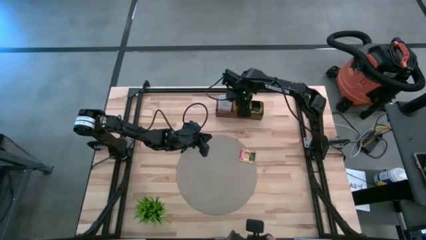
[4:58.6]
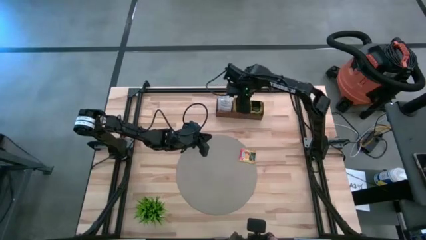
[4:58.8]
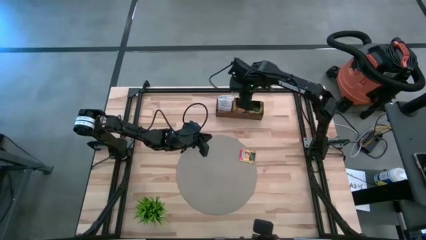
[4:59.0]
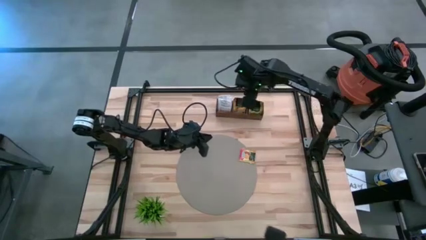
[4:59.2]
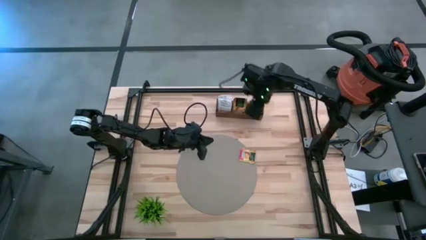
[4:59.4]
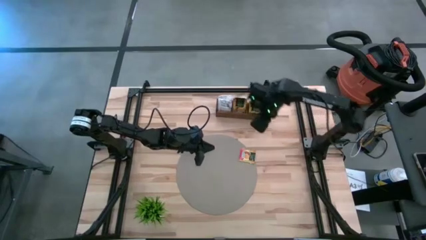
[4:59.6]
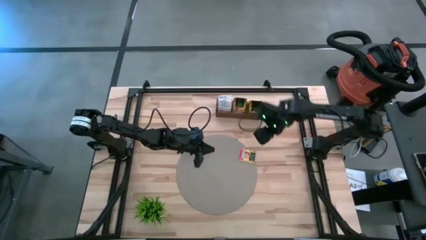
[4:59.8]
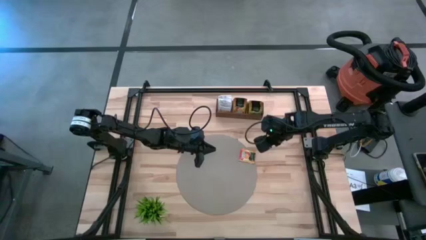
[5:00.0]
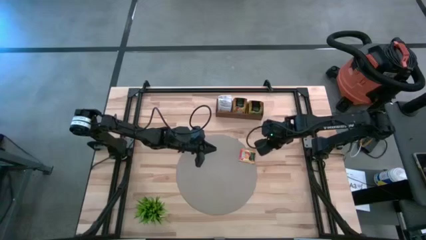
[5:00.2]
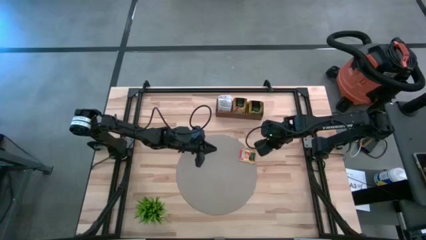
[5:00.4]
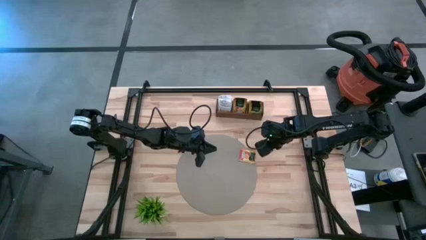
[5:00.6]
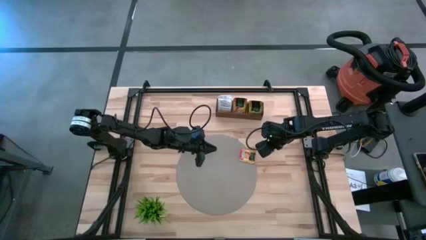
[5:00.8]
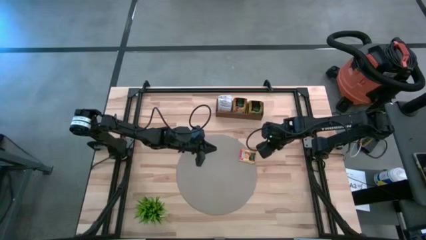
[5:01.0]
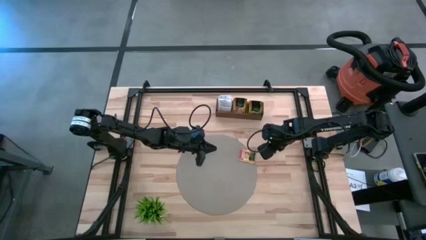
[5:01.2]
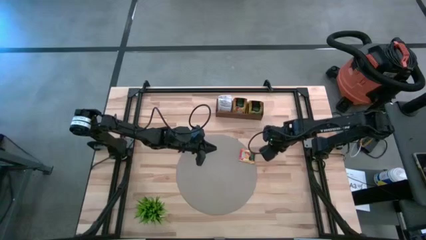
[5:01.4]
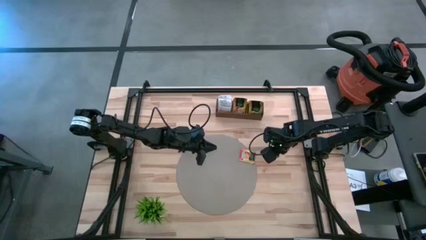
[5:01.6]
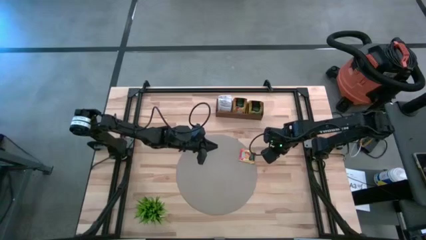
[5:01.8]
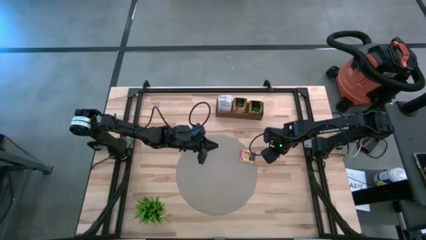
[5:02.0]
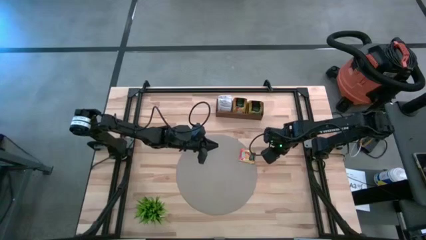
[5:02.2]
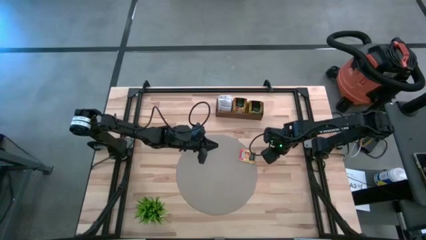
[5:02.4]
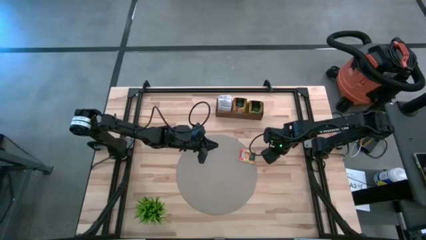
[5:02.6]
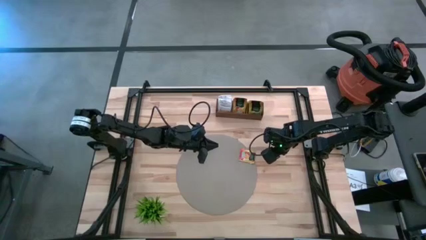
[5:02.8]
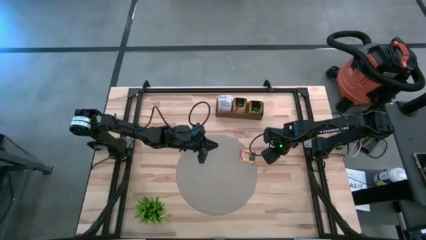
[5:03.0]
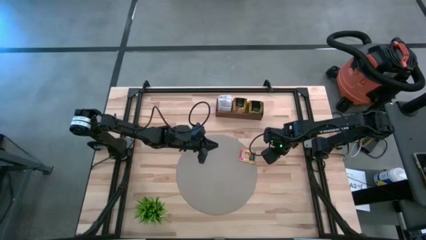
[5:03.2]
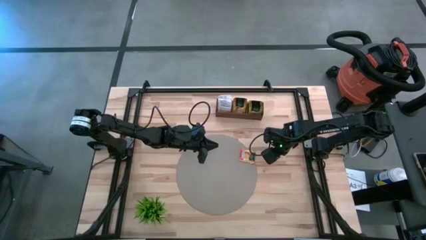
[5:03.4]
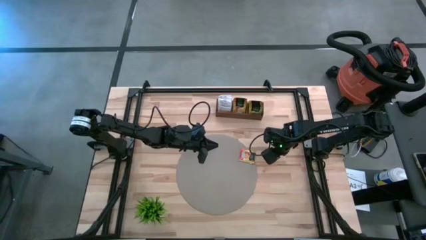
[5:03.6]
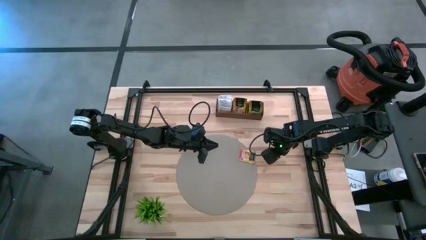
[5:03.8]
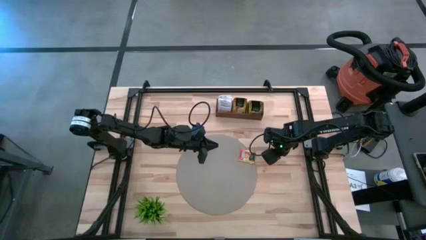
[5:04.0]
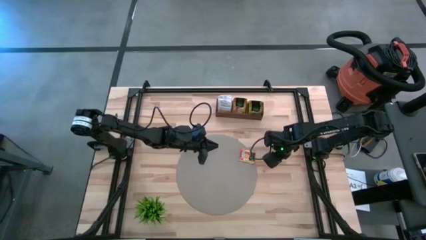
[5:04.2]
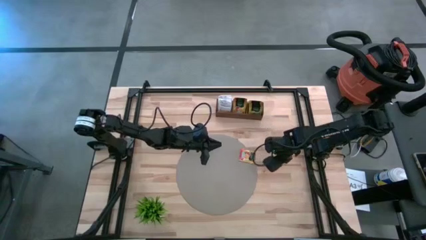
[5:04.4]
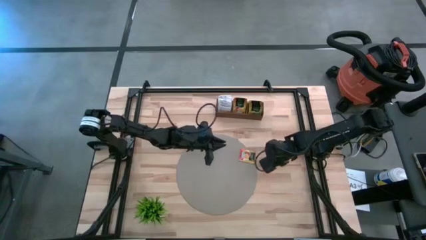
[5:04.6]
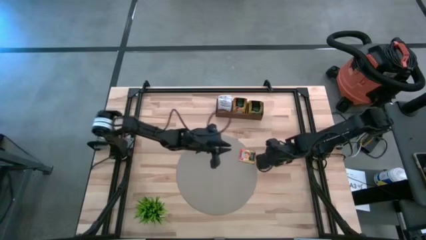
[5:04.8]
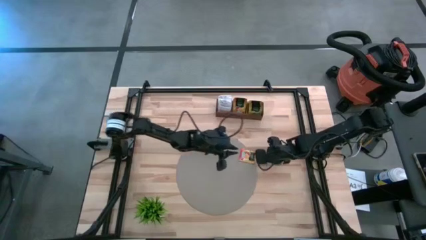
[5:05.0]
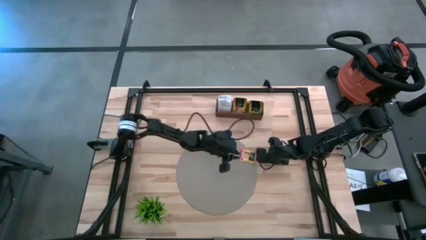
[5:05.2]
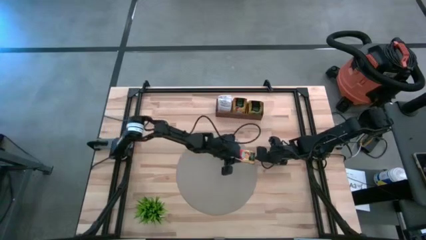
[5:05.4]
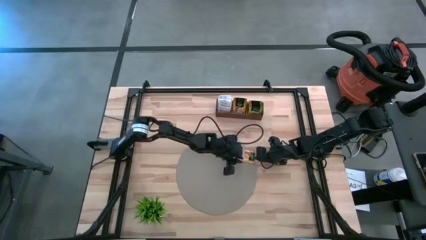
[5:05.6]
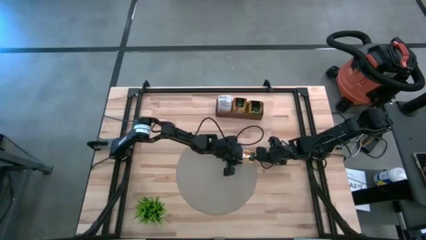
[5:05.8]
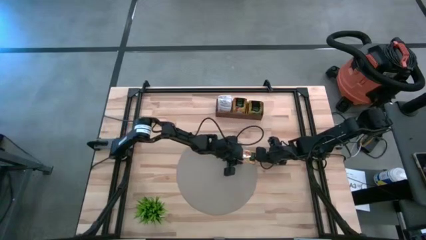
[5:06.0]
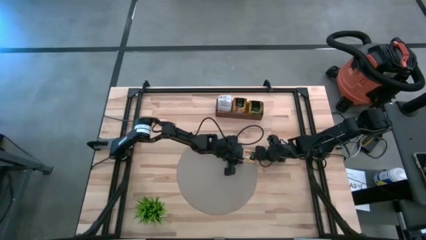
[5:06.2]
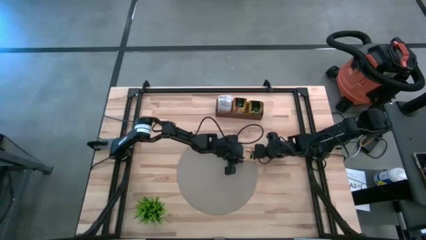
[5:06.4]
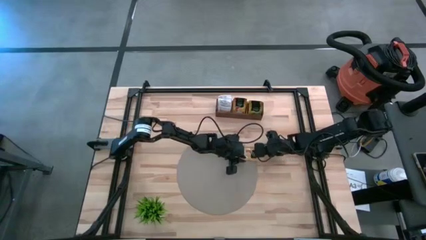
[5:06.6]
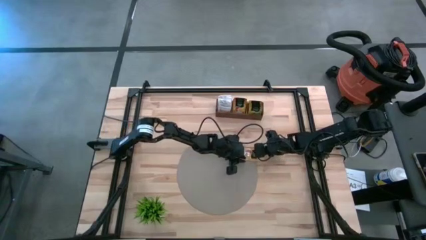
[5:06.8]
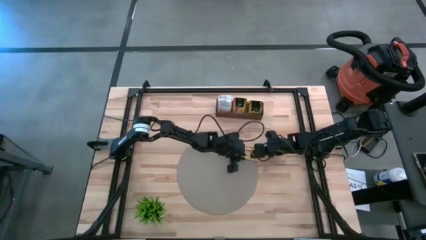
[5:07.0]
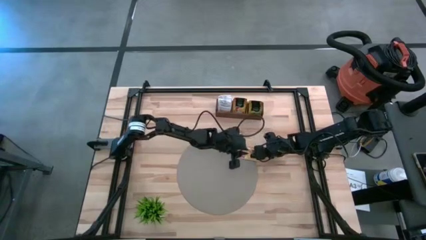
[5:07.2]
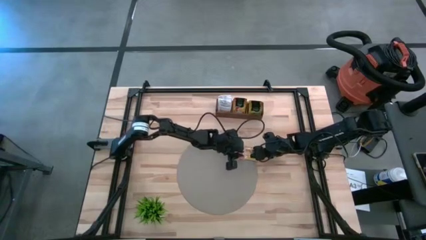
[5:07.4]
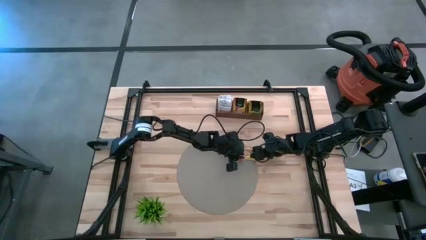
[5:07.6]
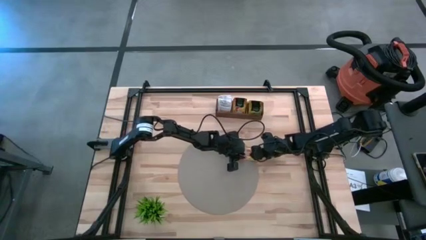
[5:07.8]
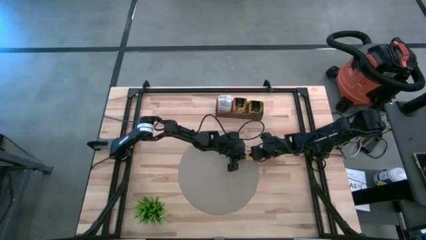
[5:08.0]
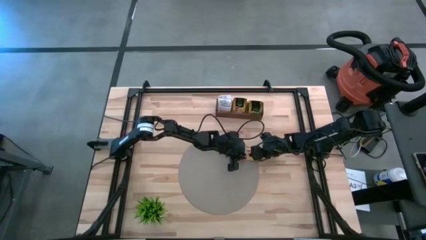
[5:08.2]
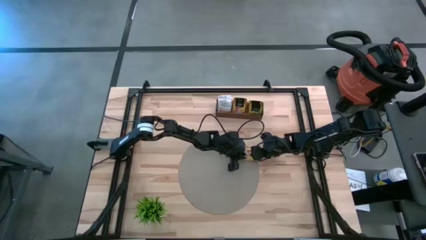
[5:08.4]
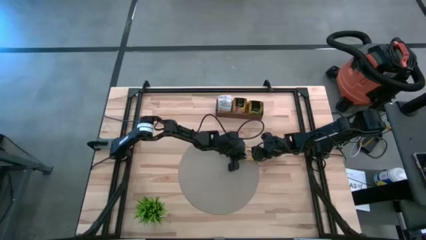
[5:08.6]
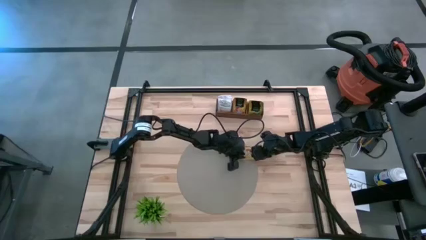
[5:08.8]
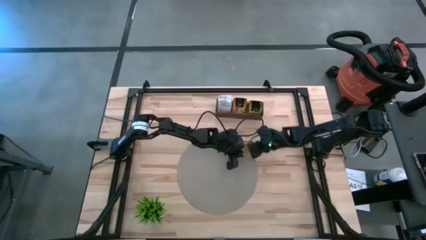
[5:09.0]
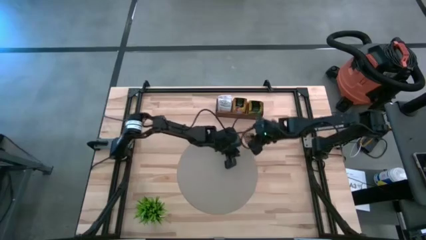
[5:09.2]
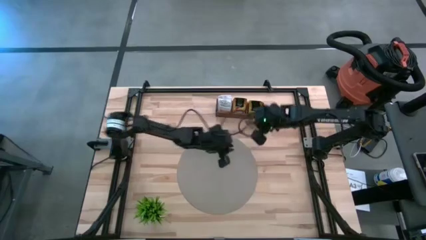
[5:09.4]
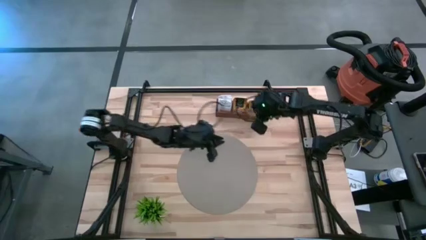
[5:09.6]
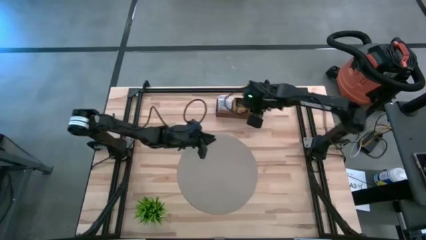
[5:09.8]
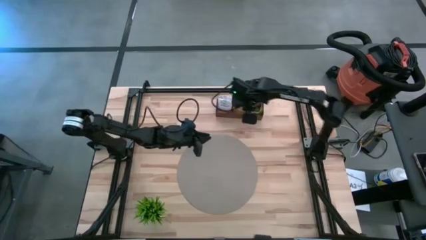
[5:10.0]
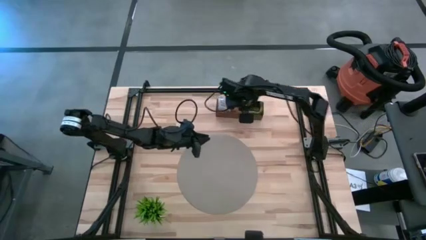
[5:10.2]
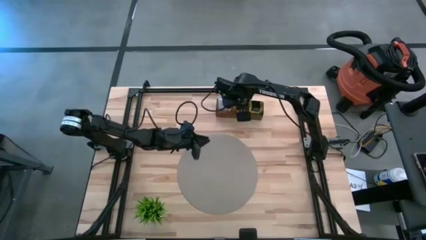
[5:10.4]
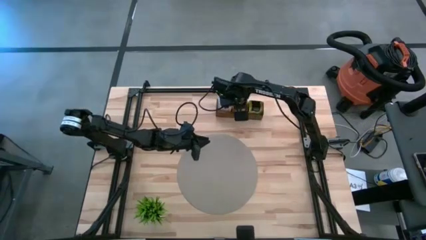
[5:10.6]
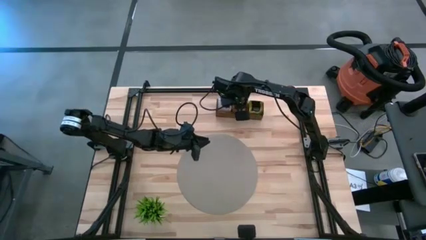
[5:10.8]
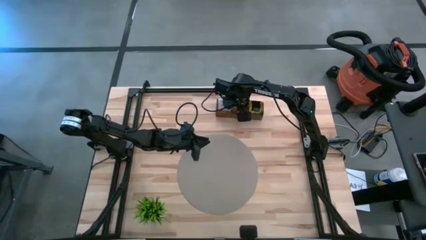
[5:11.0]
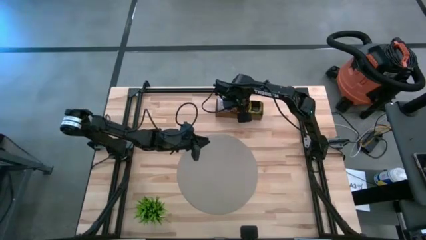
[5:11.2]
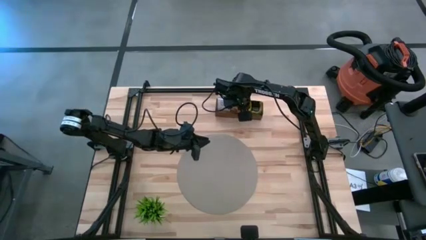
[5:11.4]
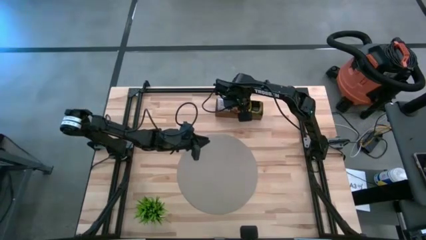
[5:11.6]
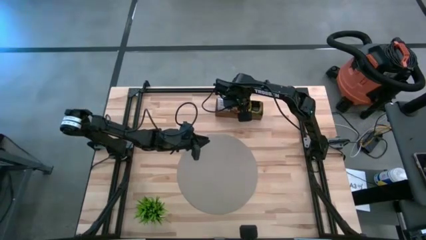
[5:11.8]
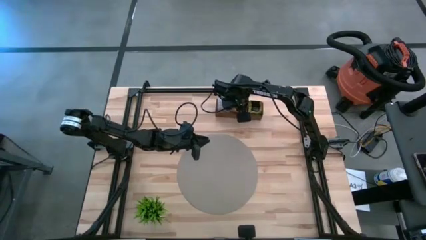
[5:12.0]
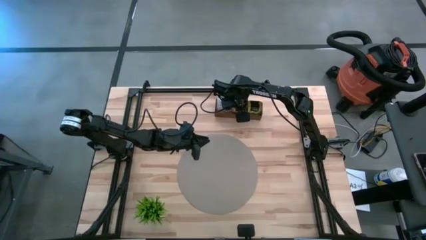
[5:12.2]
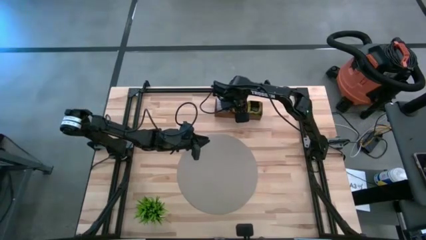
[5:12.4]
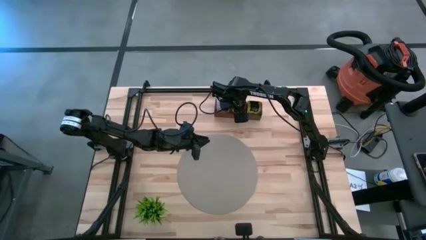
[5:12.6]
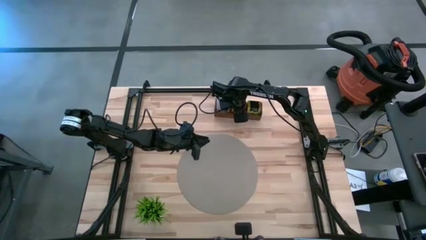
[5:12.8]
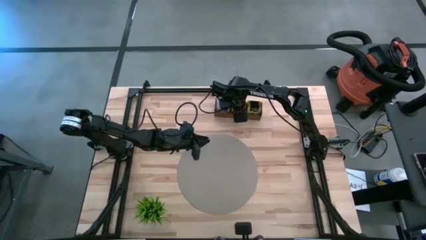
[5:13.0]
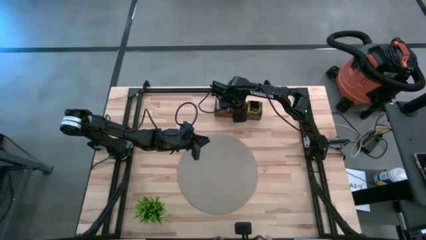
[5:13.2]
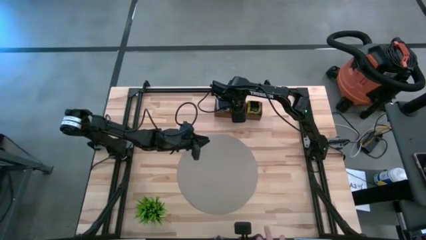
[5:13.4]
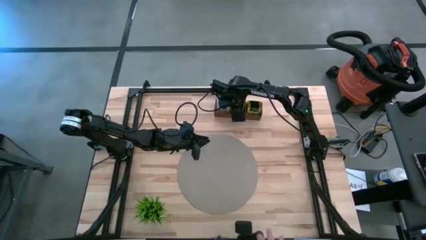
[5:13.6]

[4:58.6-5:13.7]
Task: Pick & Place Tea
Put the orange tea bag into the middle section of the wooden organizer
